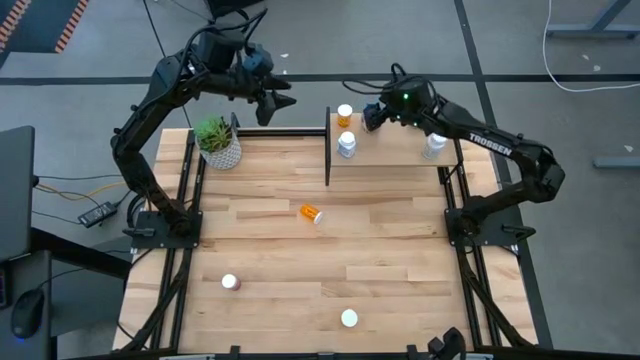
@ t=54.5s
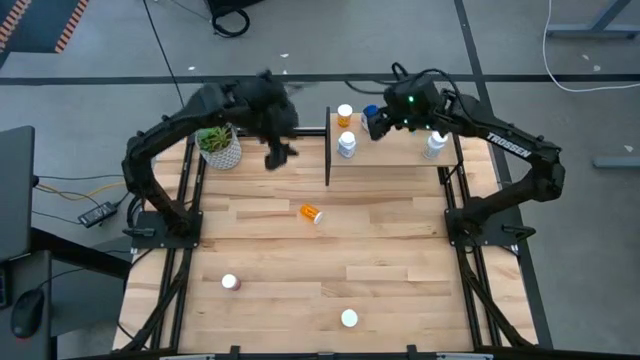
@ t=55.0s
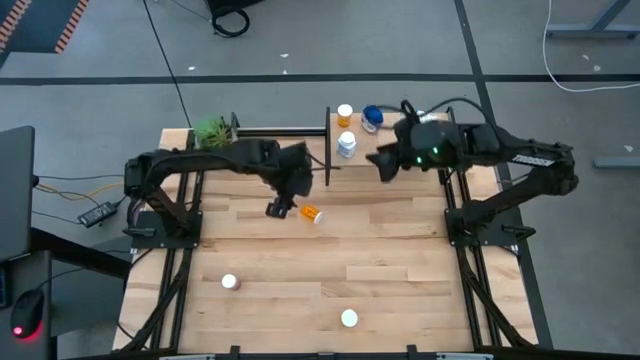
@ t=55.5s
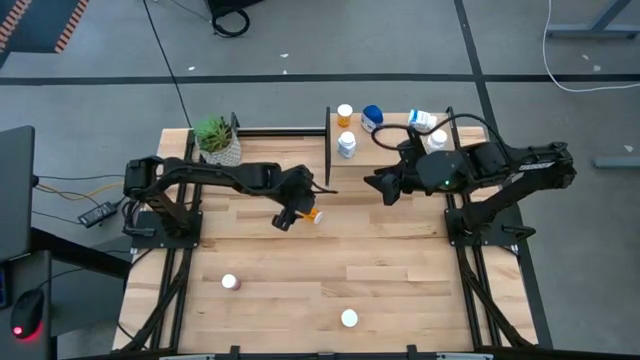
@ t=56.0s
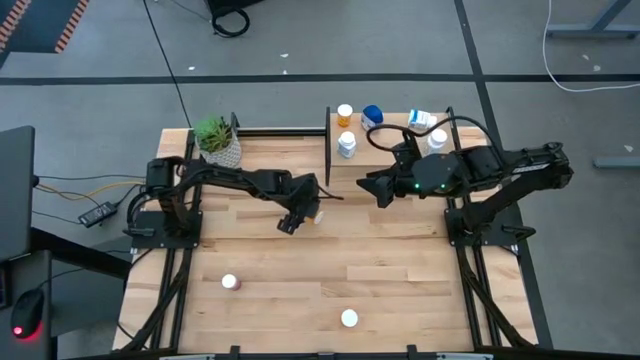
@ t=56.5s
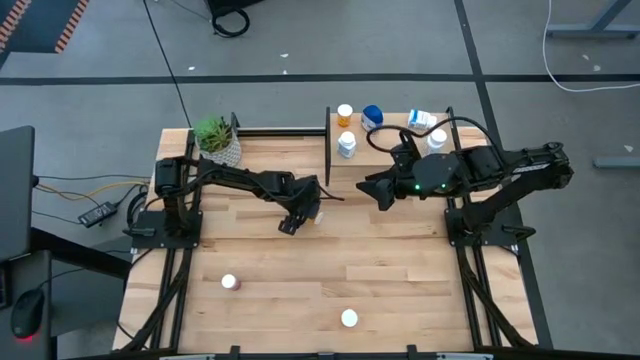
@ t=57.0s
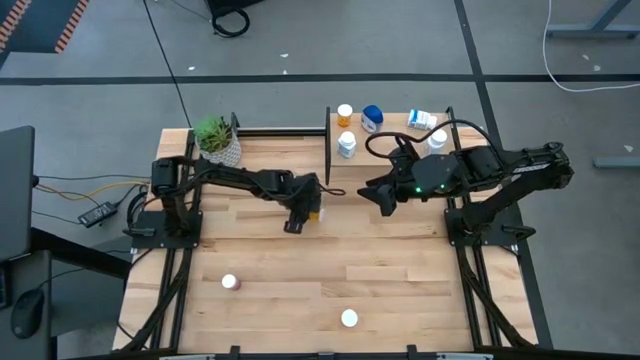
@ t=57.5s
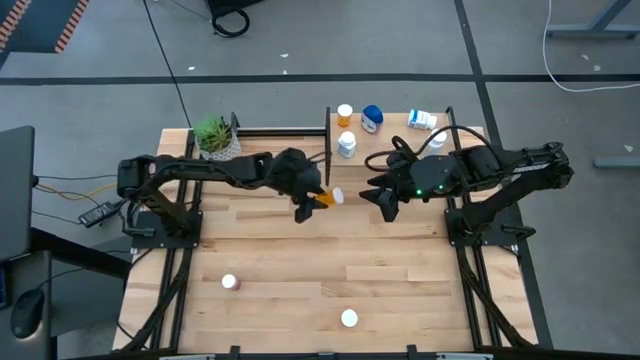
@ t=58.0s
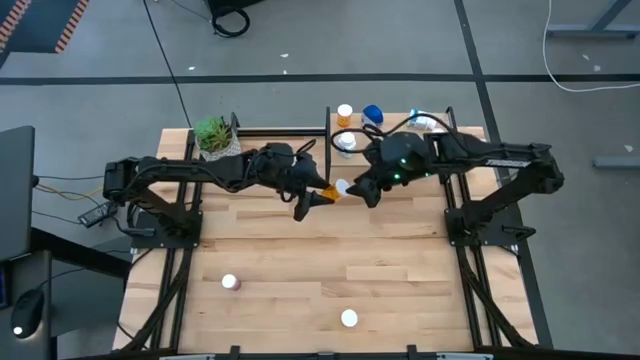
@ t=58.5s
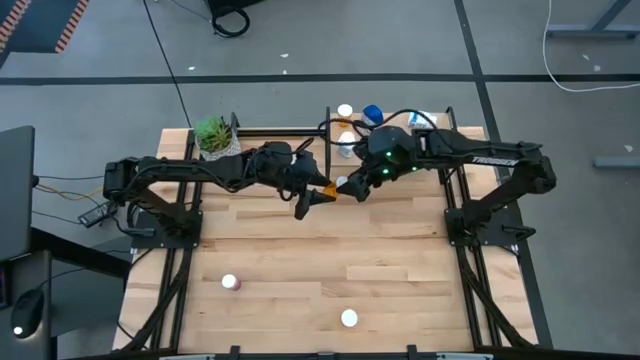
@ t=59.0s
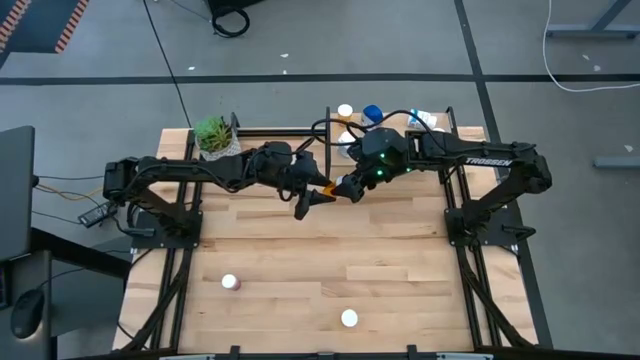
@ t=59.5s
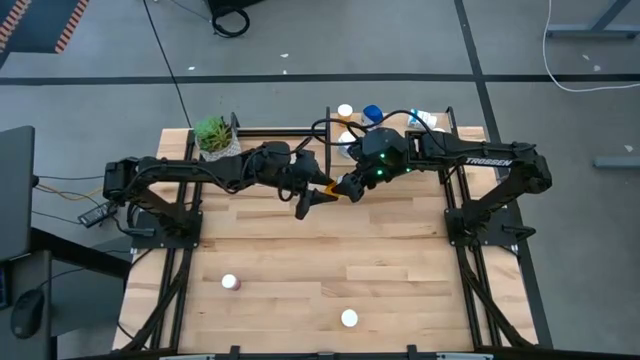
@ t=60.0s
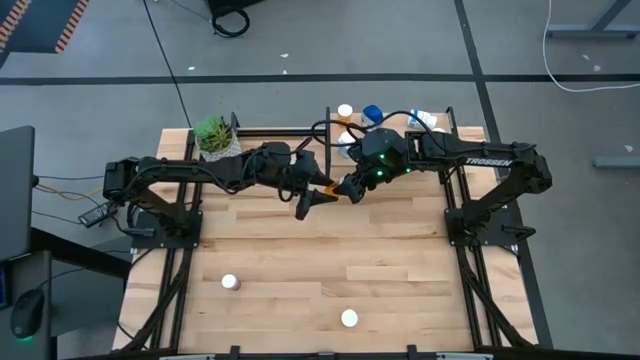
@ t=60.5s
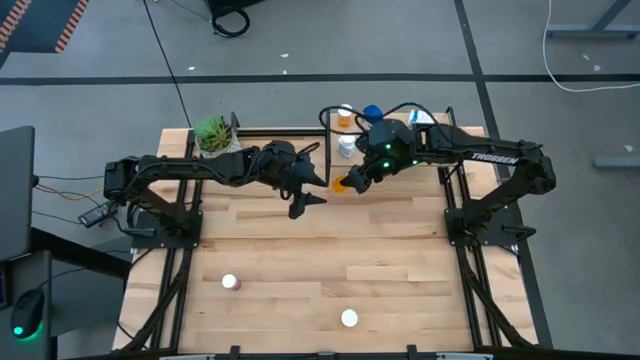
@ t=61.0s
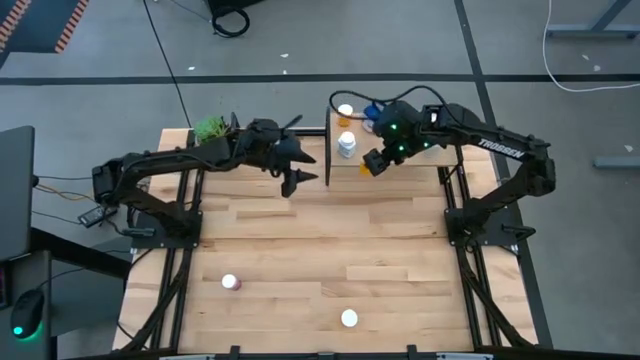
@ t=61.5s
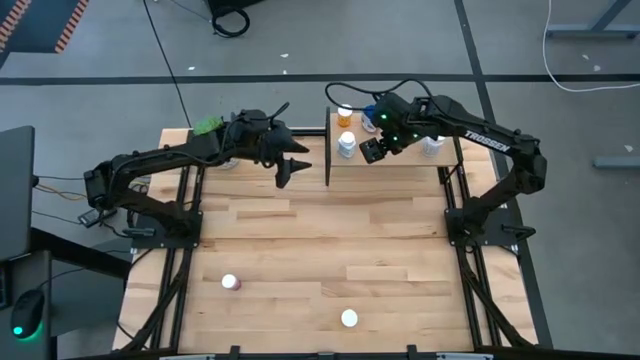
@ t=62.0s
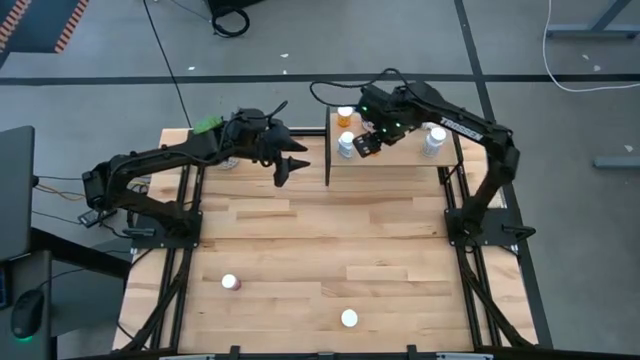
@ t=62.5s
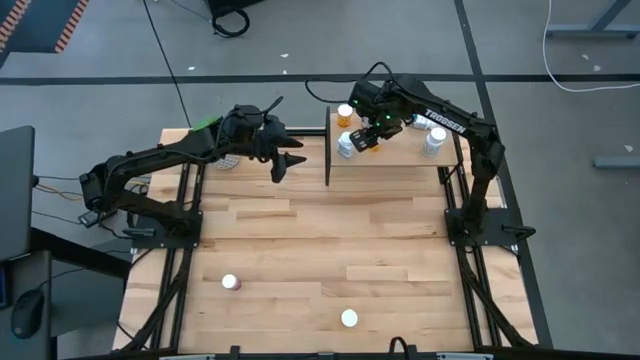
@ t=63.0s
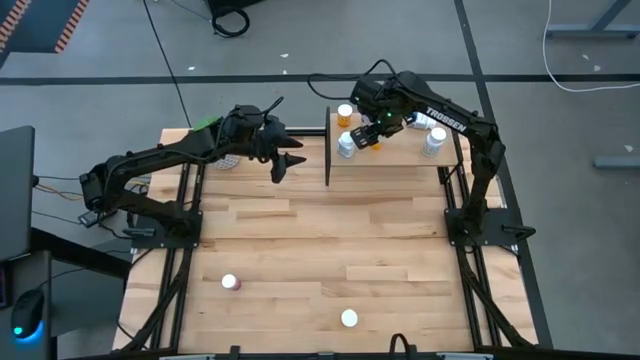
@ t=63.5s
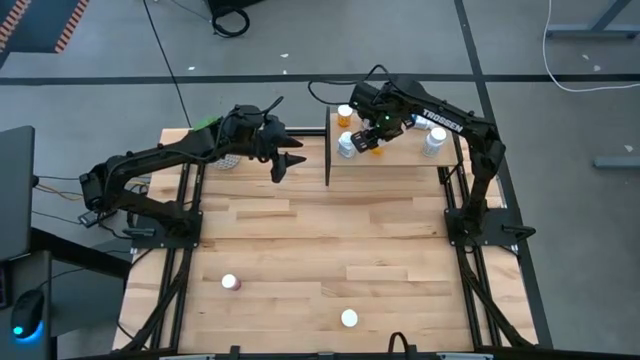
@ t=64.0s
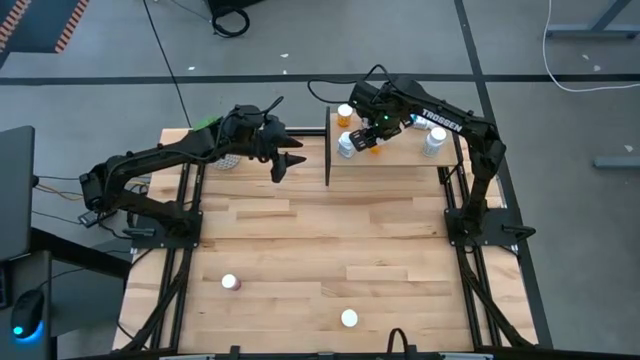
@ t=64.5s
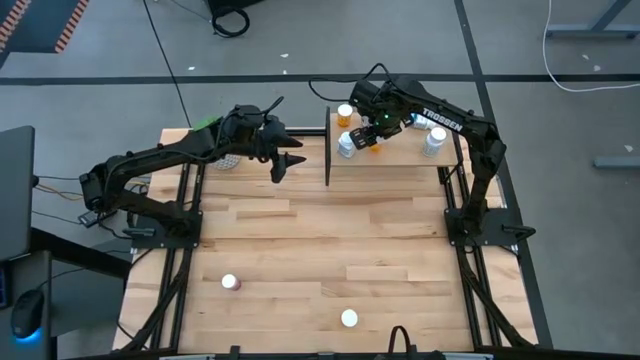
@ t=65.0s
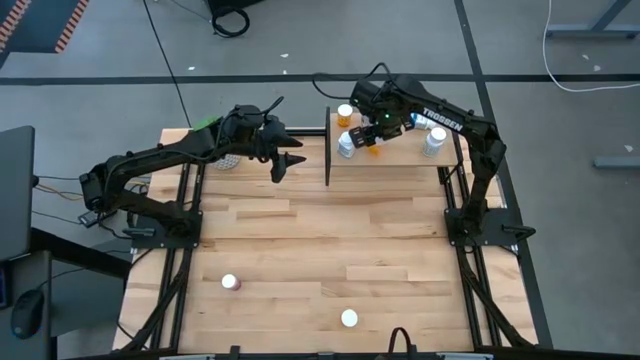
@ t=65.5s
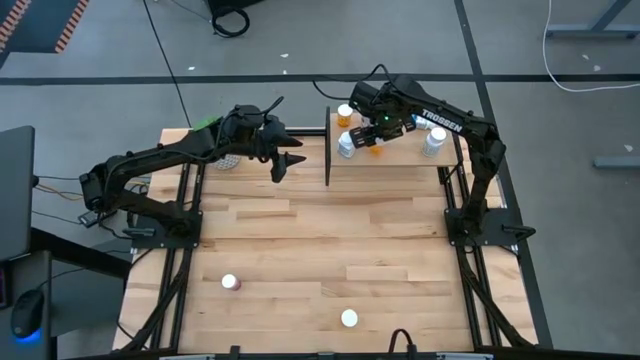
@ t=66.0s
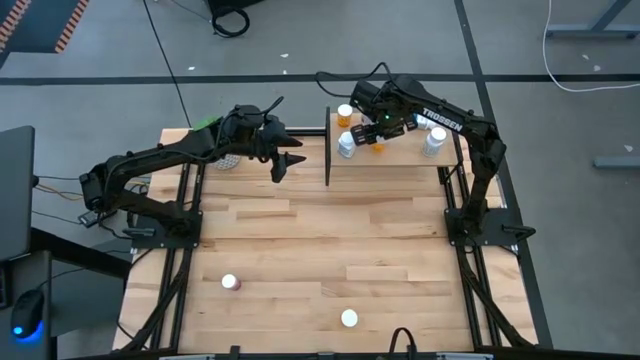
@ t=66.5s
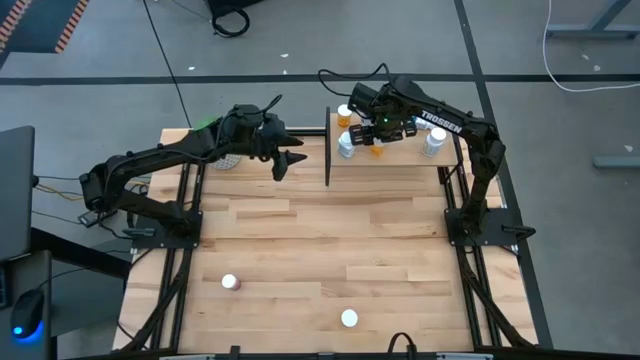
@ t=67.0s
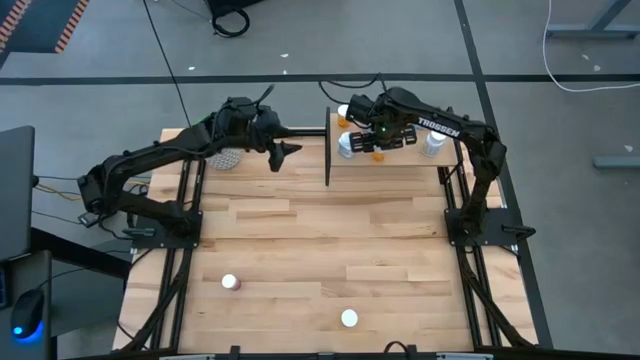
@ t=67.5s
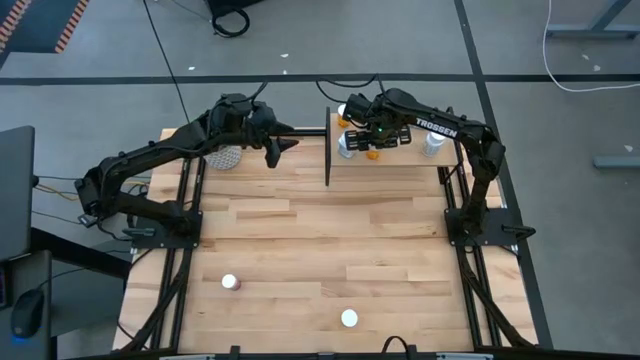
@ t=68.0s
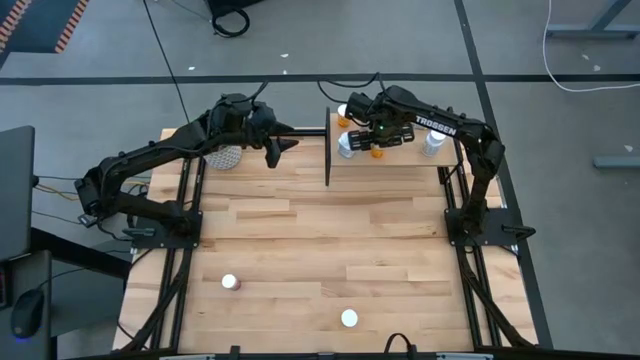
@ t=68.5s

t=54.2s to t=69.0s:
Task: Pick and place medicine bottles onto shelf by color
Put the top orange pill bottle on the shelf aligned with the blue pill bottle

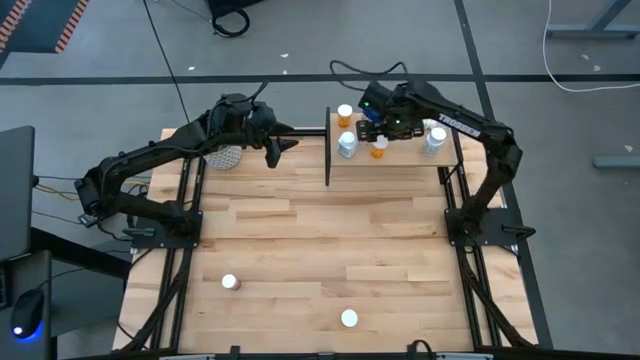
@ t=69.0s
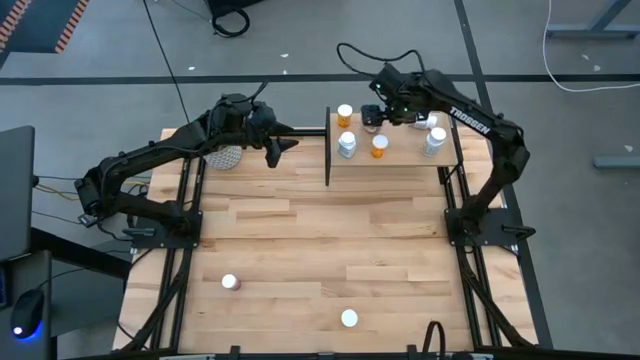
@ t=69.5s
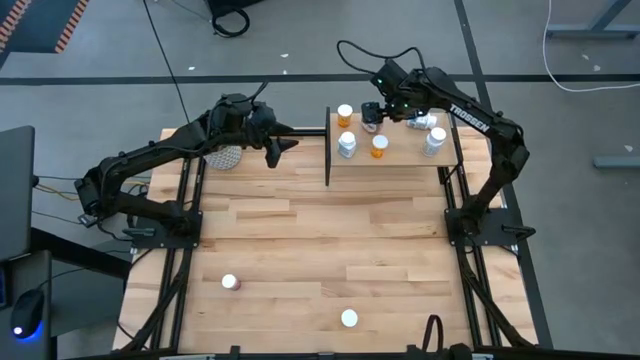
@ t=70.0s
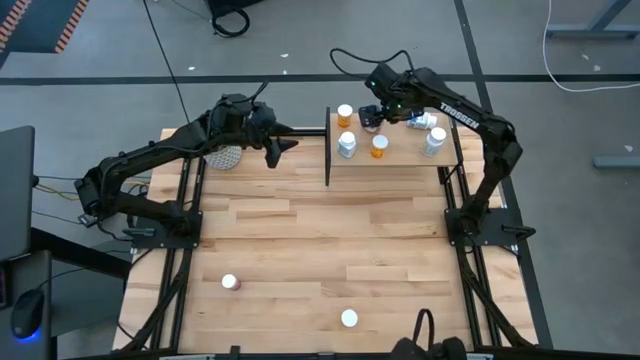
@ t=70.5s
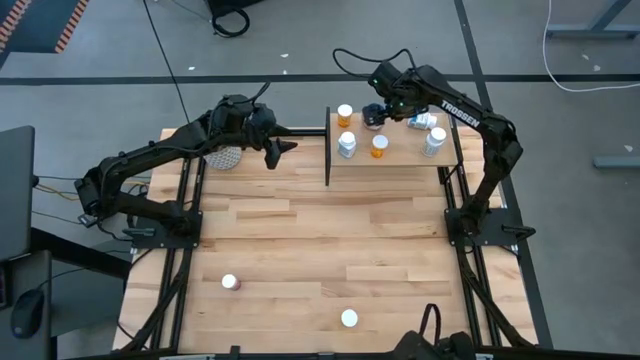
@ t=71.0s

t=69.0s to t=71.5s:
Adjust the blue pill bottle on the shelf

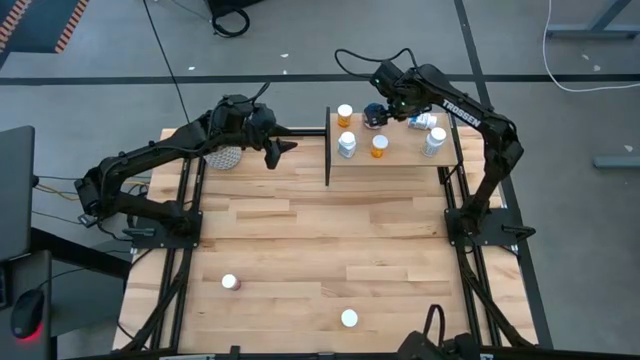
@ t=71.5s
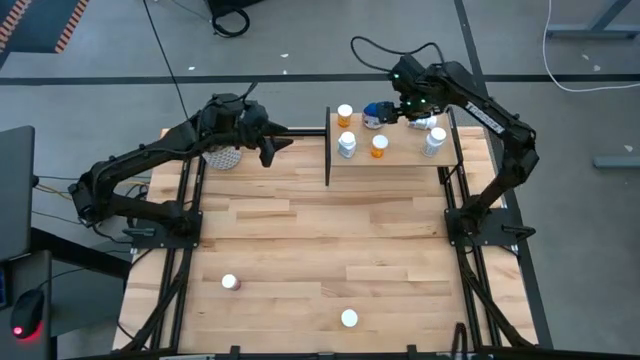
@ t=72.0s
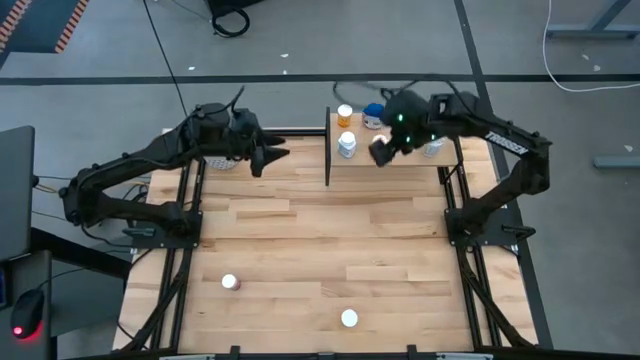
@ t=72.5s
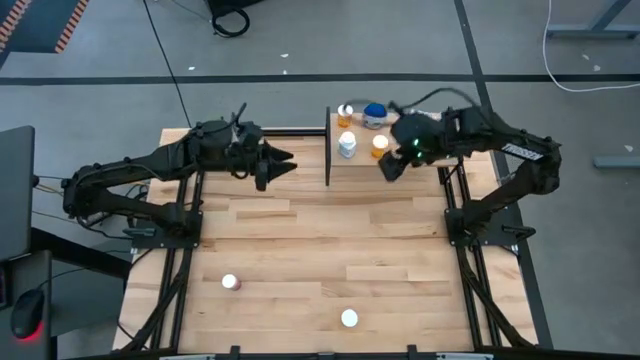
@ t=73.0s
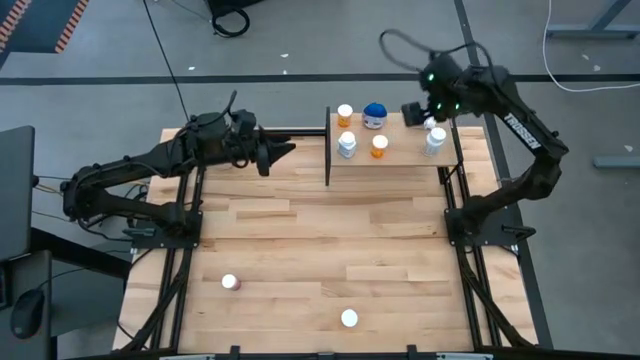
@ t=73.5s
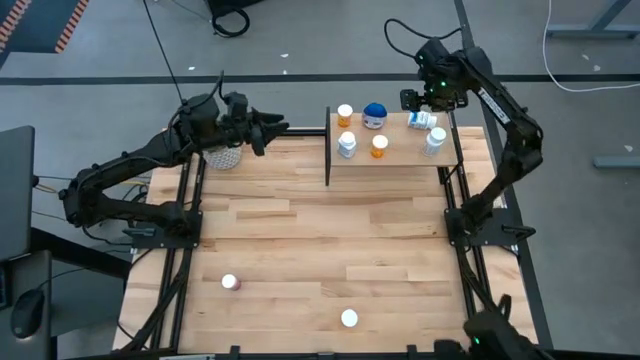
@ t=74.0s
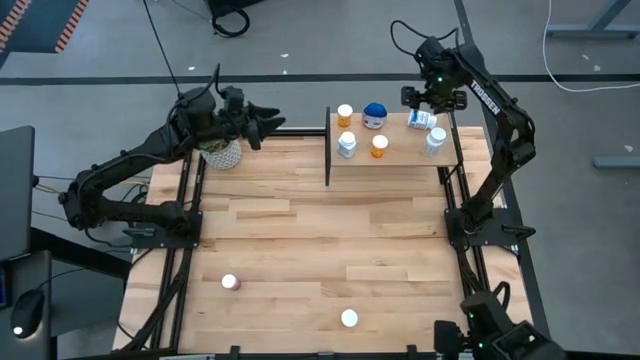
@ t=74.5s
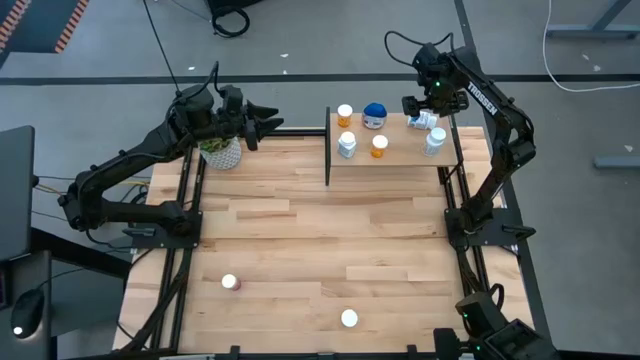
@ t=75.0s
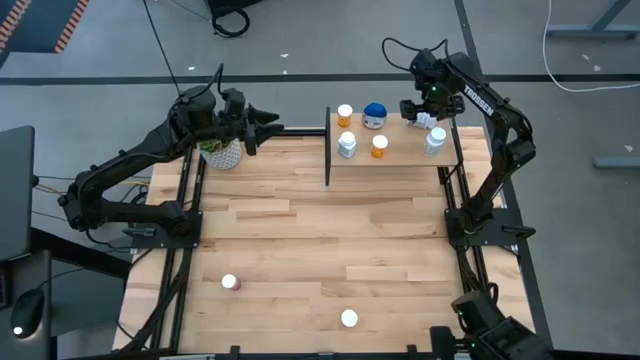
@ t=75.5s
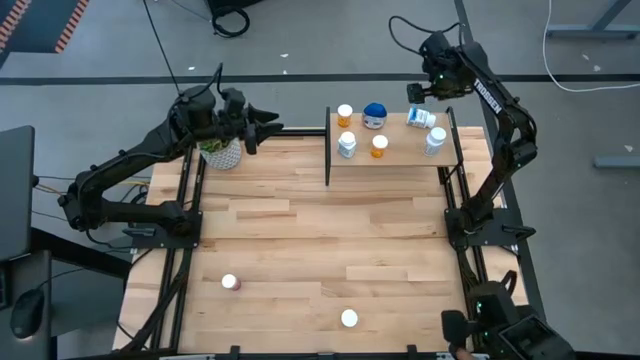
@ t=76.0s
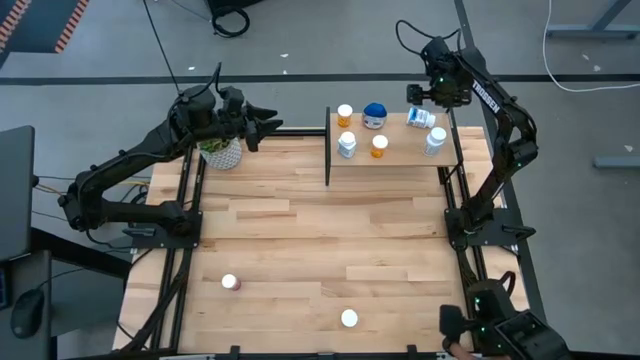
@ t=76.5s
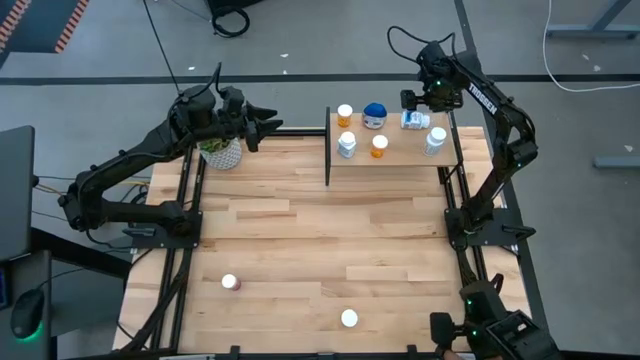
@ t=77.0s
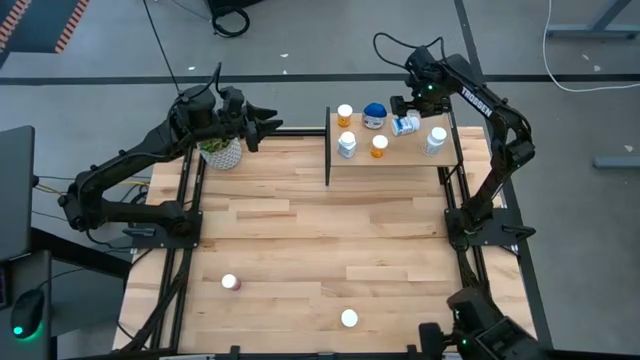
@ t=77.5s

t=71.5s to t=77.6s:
Adjust the white blue pill bottle on the shelf
